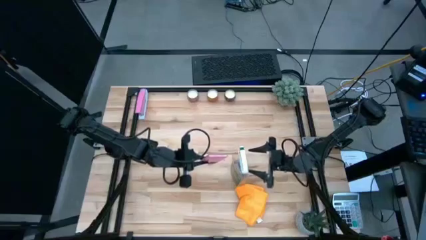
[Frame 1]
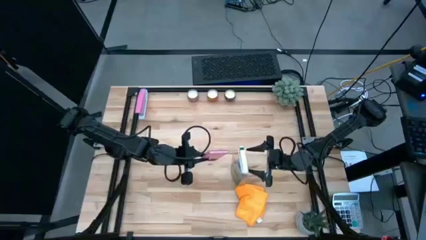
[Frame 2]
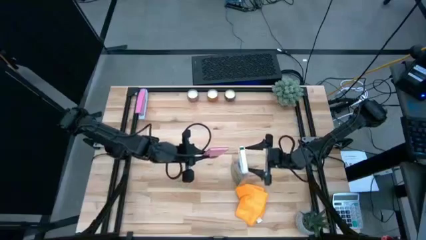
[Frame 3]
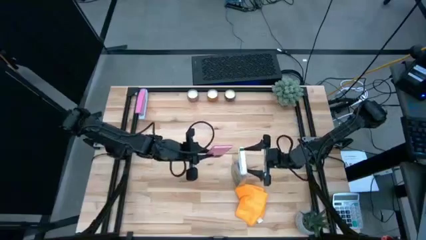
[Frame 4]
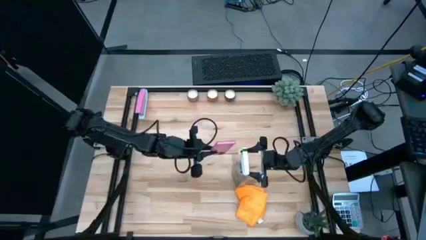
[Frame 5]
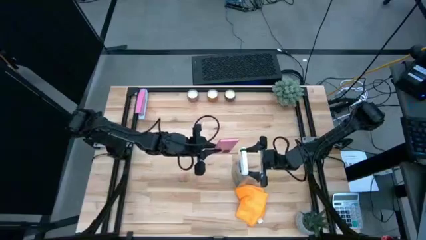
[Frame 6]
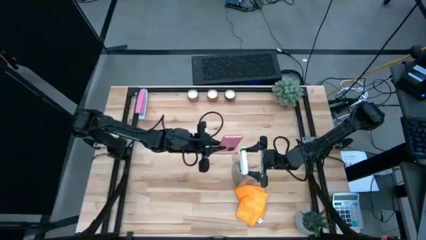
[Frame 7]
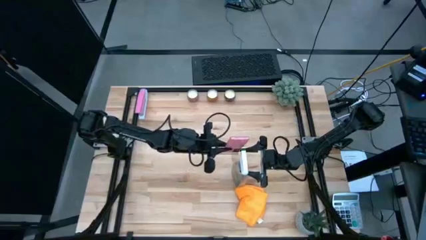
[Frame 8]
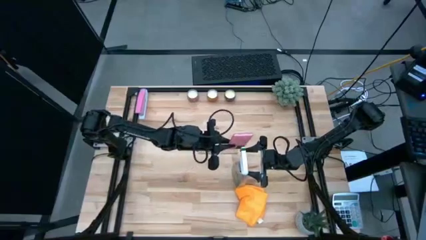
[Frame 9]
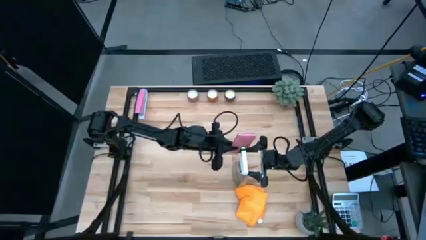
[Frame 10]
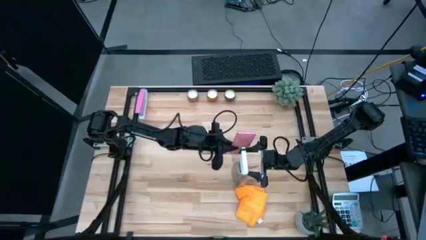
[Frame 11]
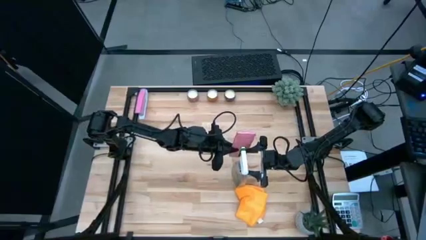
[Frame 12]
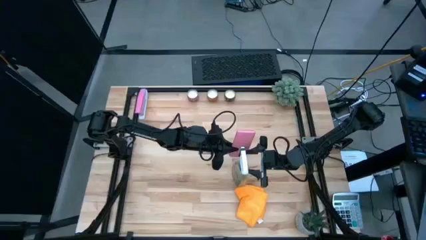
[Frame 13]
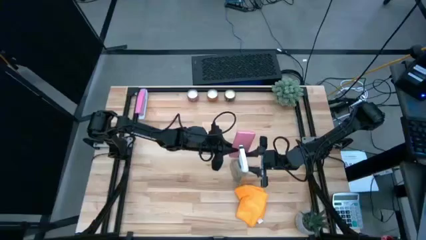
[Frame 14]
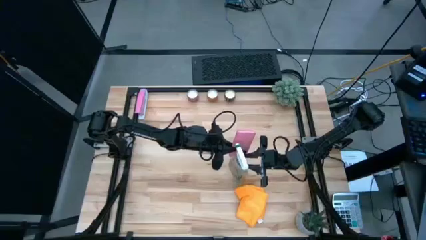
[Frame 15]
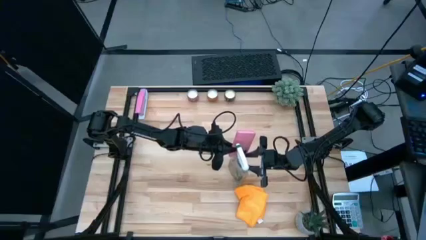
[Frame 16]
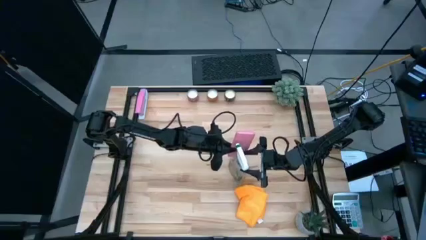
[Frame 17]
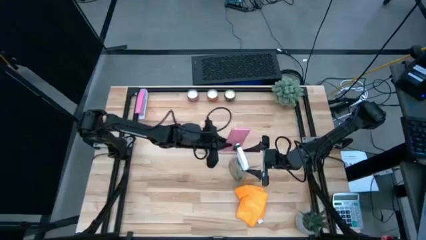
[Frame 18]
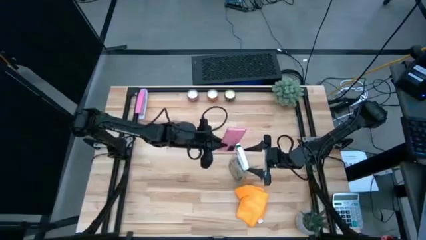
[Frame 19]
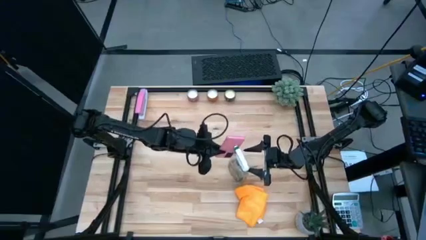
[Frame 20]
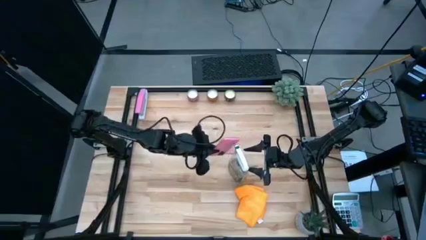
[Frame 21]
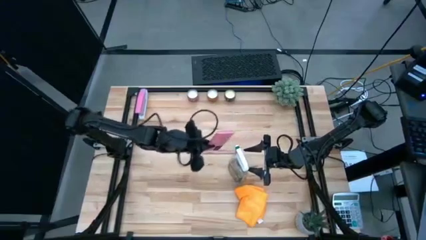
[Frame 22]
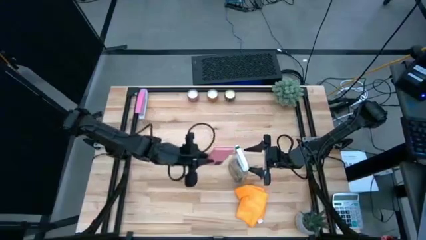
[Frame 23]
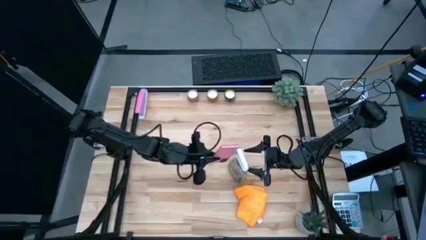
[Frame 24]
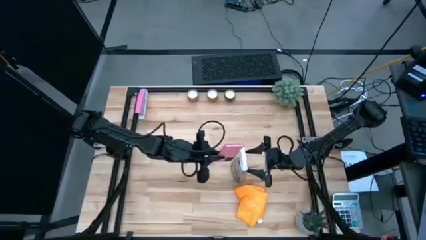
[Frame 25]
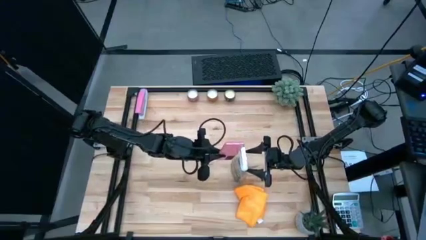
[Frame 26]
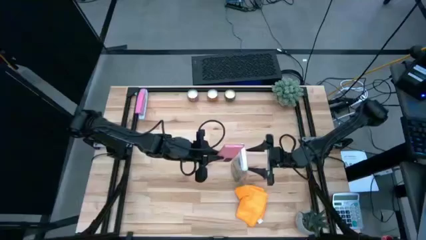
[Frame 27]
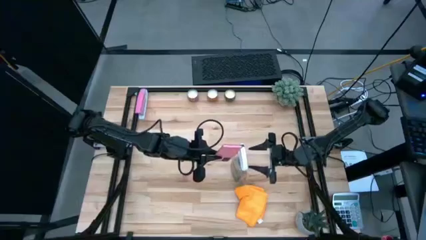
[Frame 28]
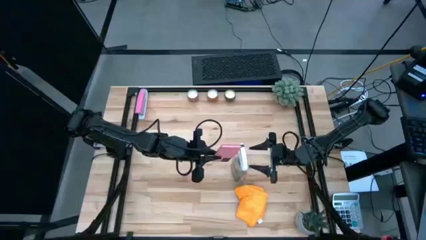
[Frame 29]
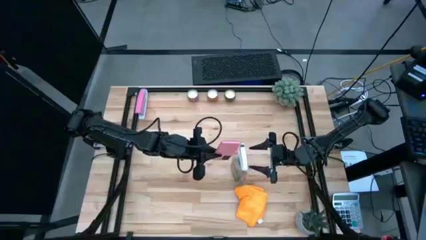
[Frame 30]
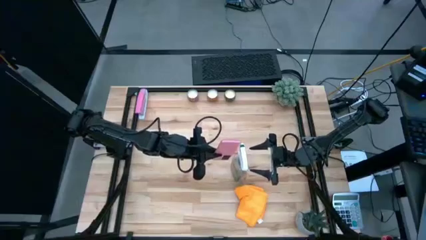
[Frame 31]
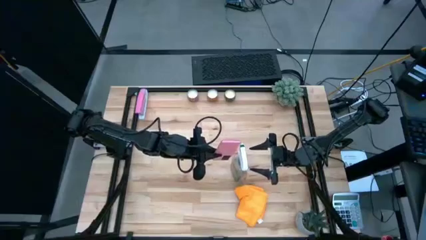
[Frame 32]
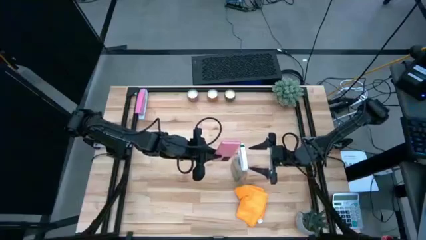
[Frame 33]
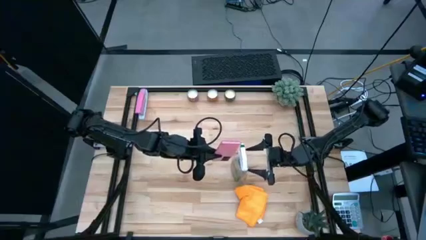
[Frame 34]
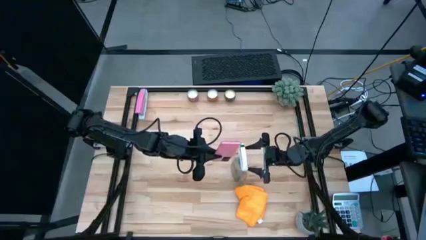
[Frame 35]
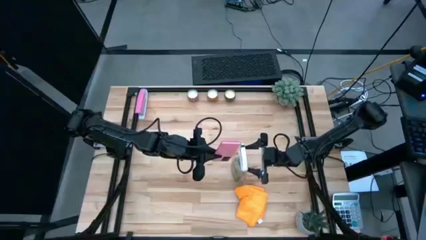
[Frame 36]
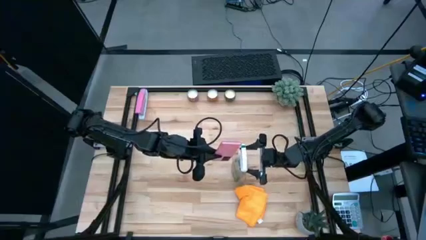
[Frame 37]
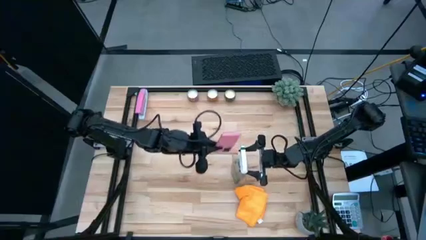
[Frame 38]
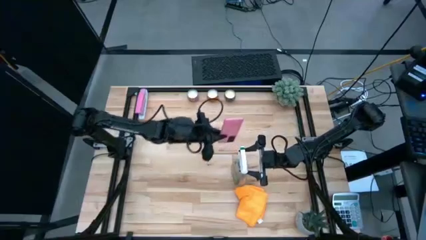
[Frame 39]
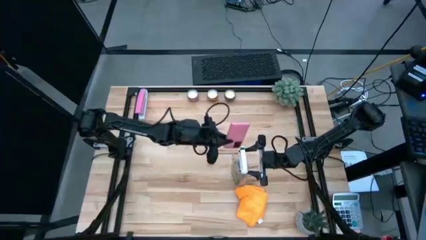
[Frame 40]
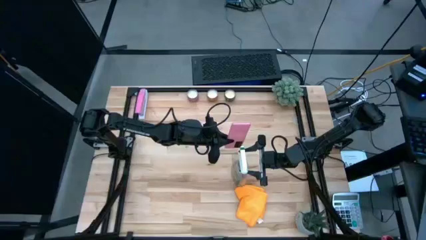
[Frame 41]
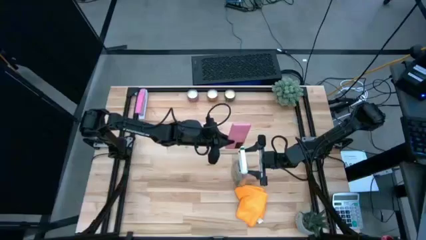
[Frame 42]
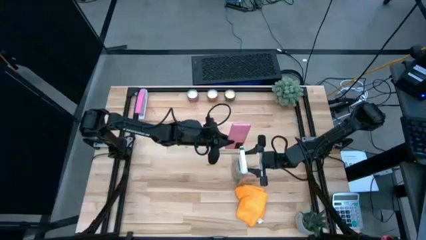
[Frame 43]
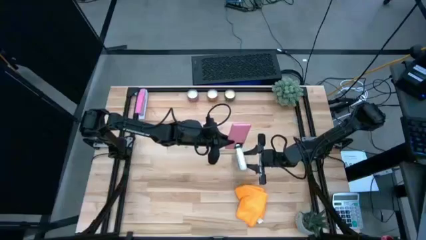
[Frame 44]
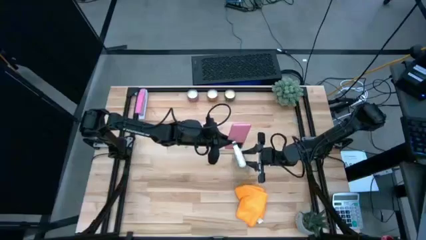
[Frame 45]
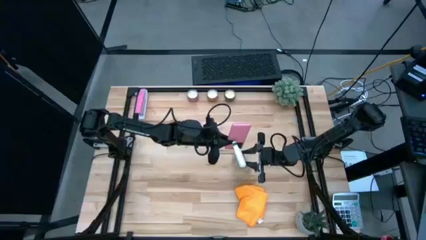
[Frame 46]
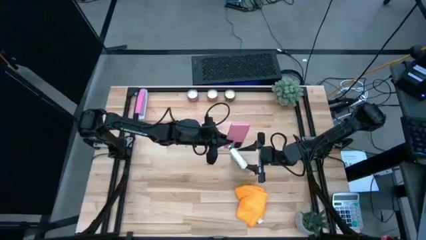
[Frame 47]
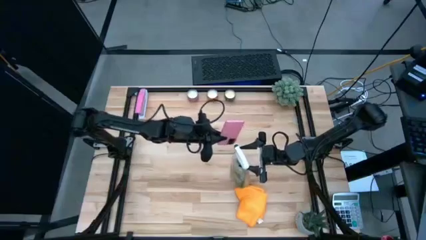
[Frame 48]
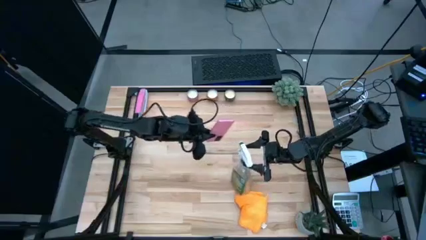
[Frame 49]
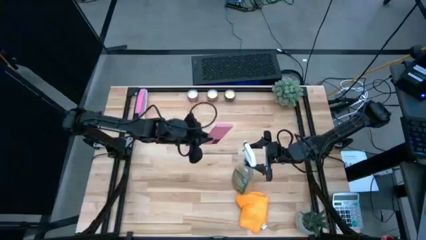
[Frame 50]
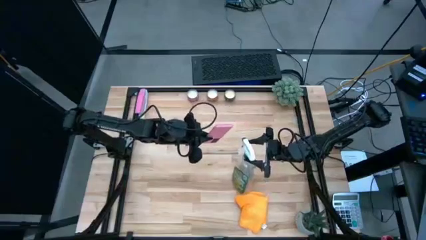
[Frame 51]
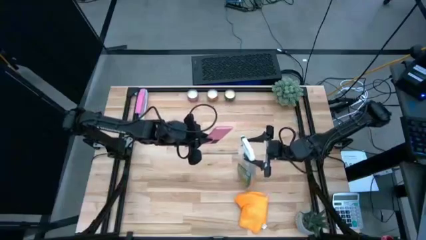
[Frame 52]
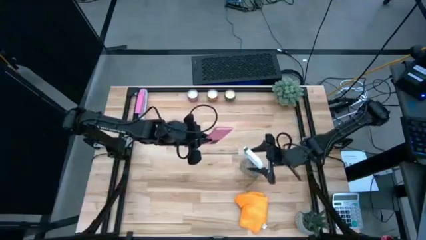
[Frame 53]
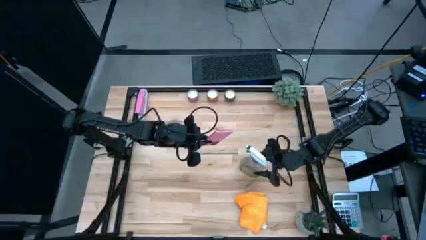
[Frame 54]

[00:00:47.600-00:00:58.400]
Task: Apply microfiber cloth
Spray the back side of the cellphone using the spray bottle

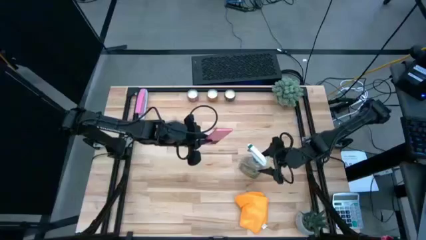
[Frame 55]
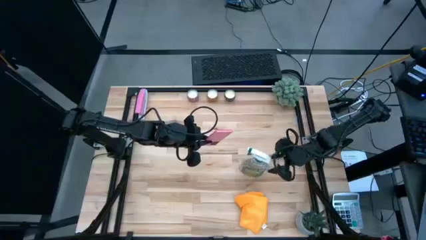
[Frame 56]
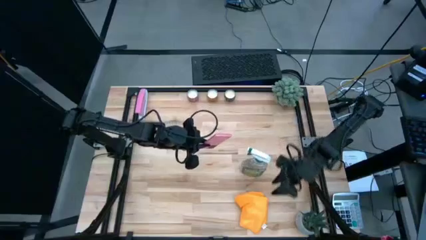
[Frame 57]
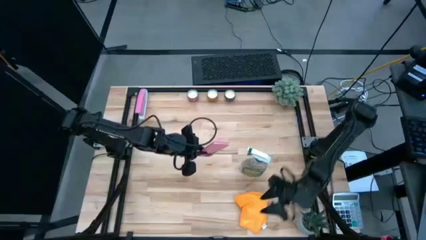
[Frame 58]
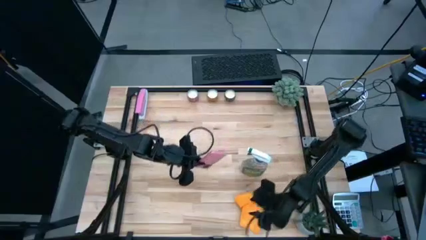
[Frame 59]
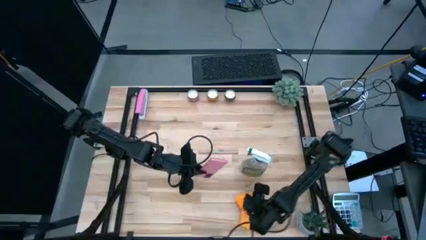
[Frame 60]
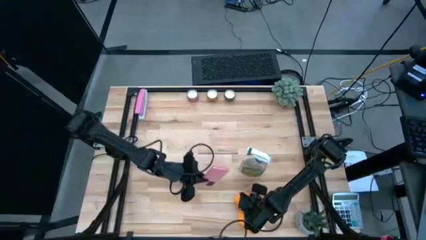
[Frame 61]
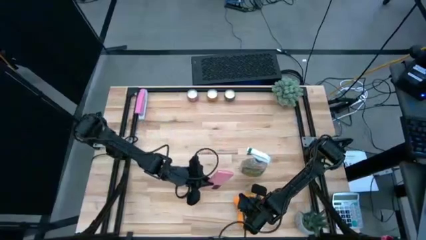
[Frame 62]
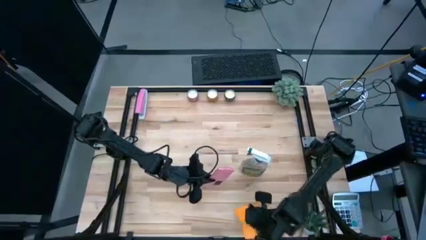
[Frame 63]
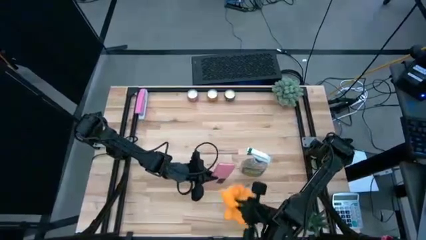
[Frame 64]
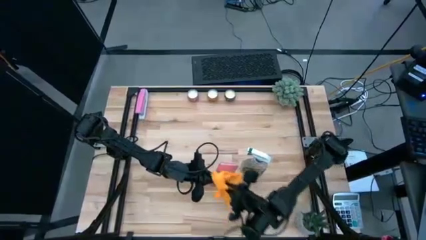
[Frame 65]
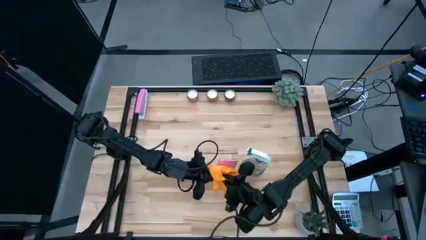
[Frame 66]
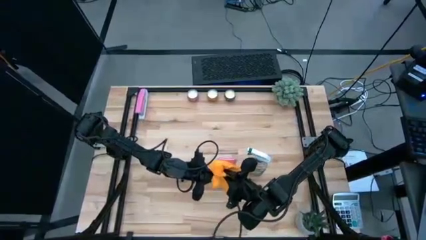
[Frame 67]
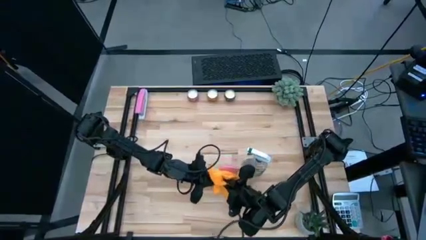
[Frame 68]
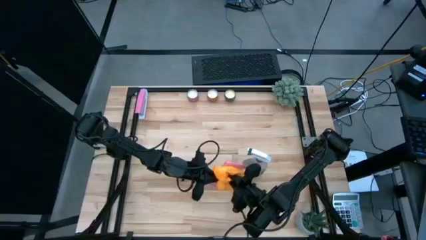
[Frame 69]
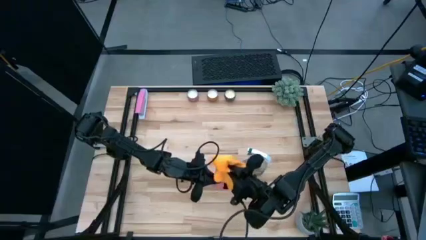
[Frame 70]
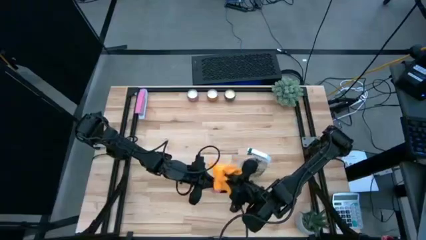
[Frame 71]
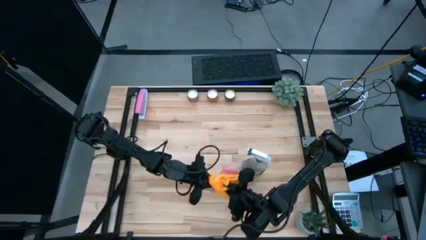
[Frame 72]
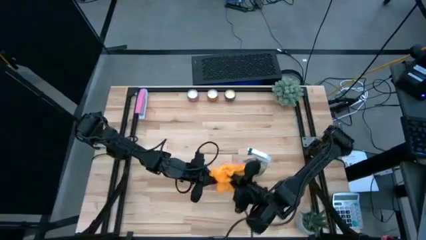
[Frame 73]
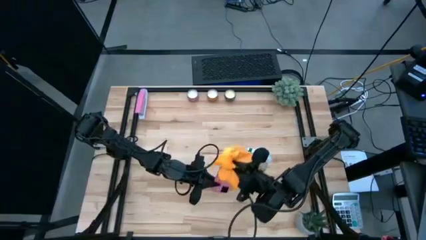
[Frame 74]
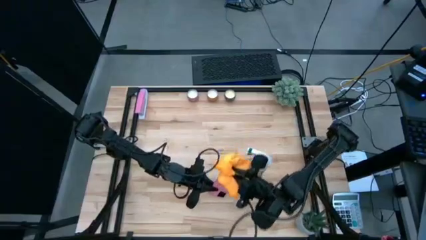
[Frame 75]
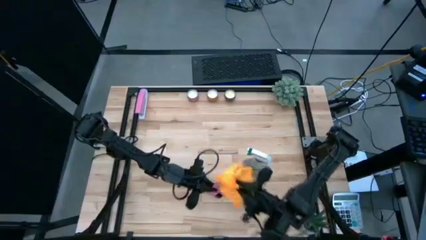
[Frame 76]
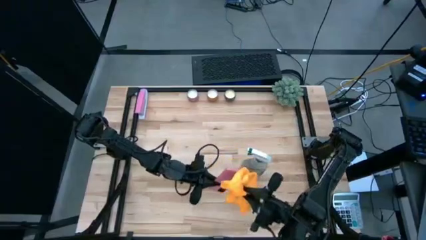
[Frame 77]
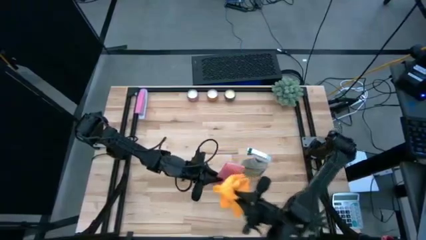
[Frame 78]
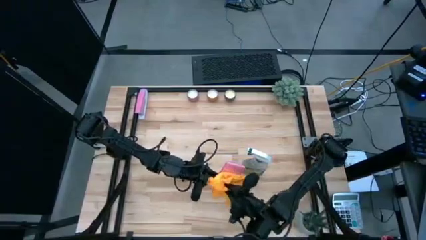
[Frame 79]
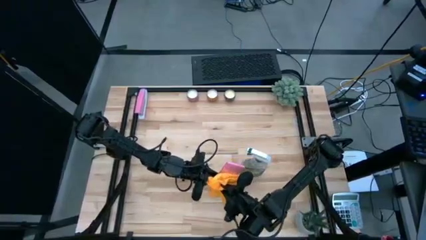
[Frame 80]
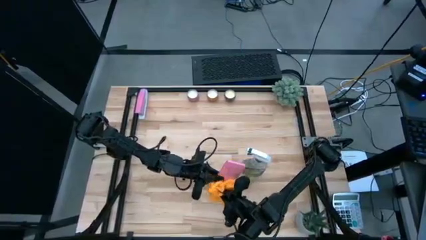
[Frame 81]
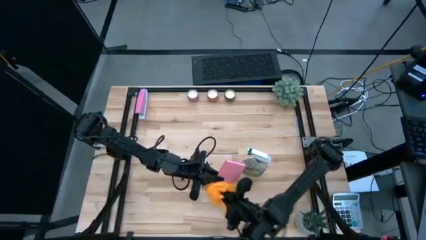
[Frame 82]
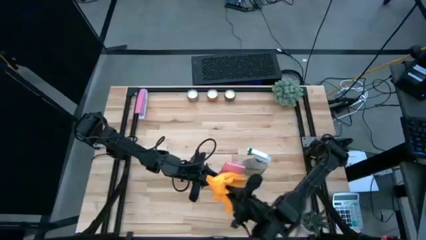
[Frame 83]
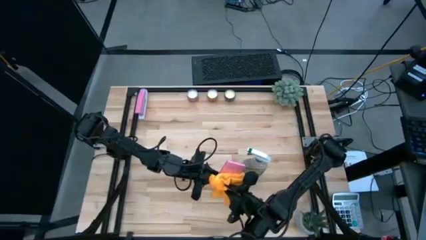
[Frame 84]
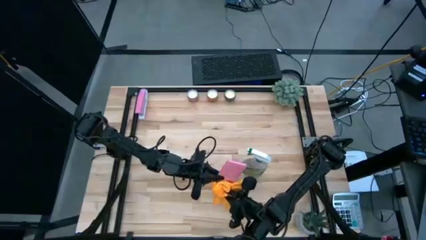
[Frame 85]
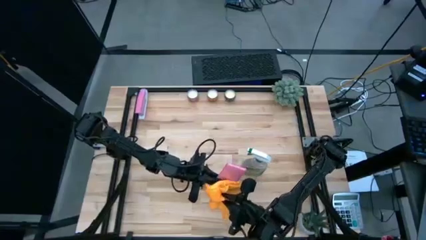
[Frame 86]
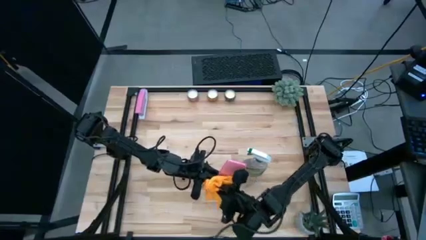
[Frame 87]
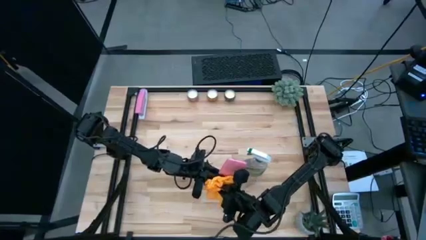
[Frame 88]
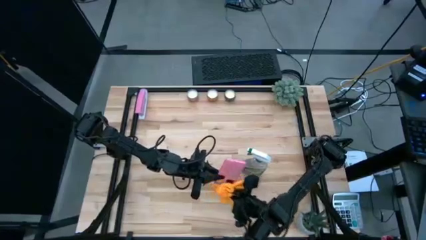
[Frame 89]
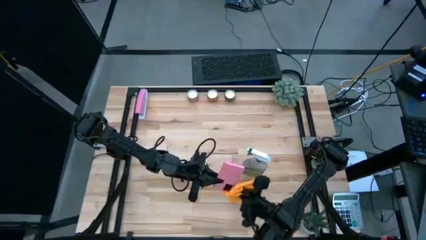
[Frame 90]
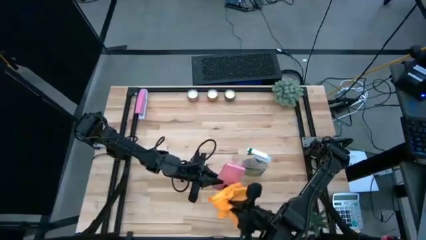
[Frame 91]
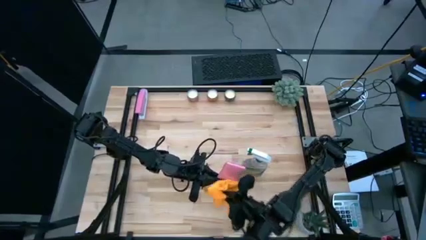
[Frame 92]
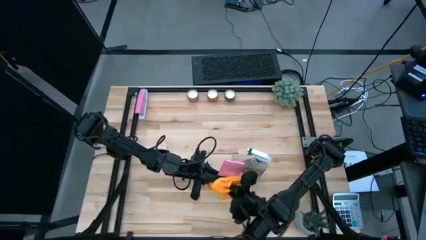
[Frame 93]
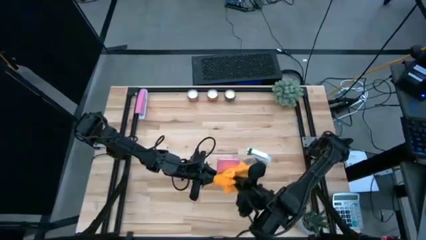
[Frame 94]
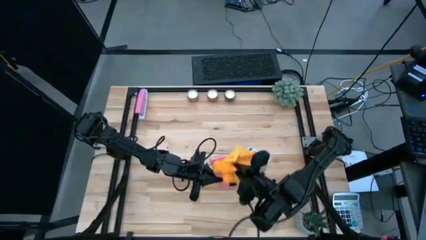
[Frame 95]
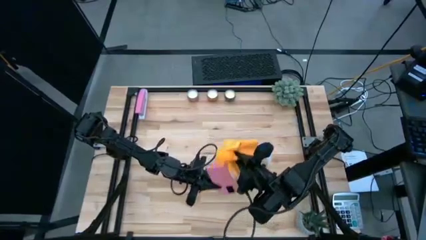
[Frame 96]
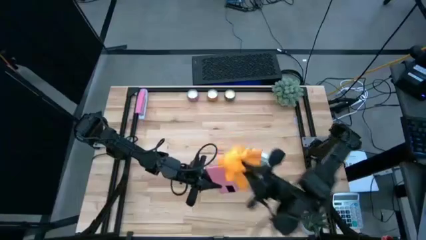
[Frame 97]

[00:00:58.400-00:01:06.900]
Wipe the back side of the cellphone using the orange microfiber cloth
